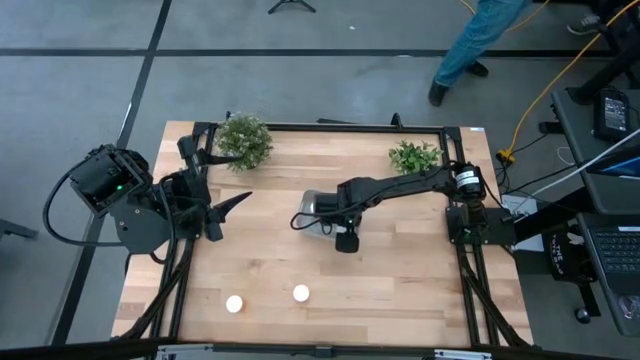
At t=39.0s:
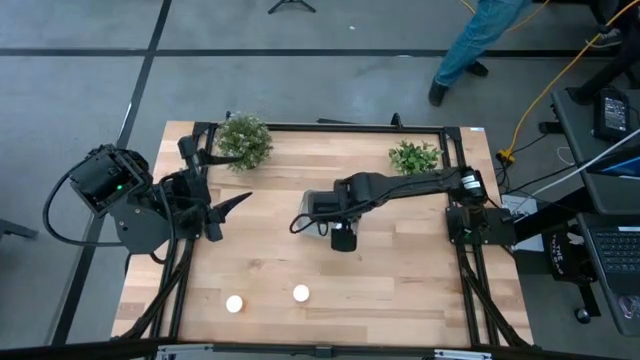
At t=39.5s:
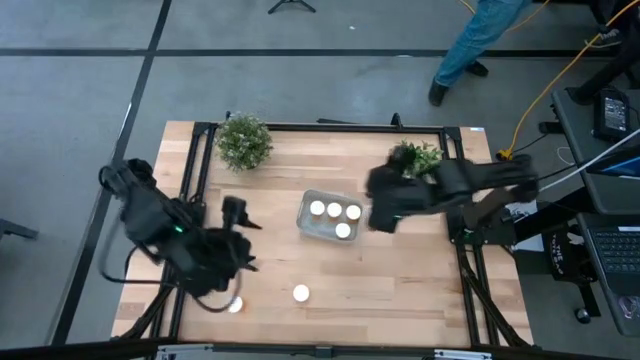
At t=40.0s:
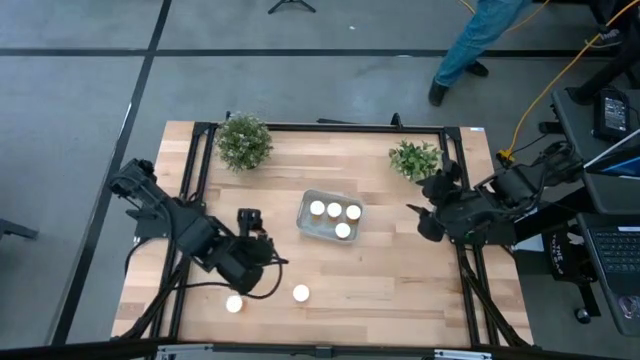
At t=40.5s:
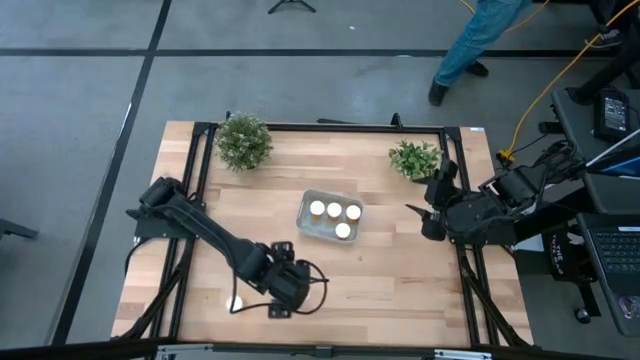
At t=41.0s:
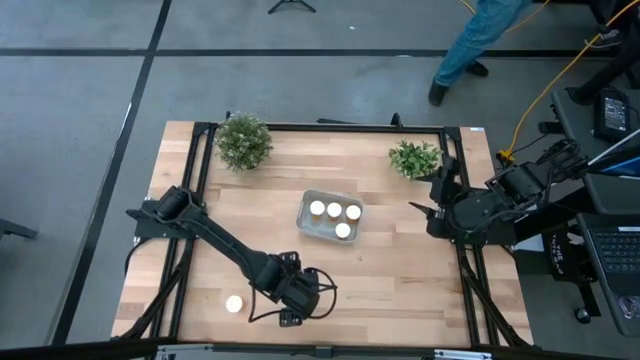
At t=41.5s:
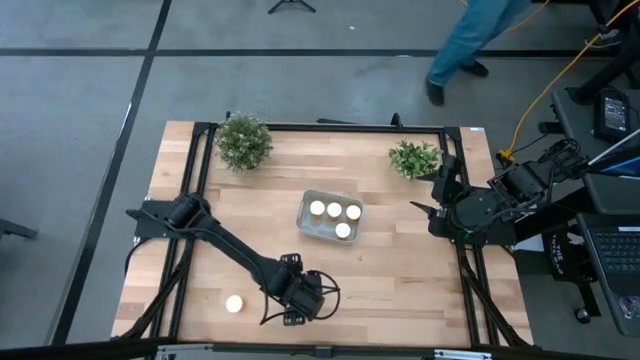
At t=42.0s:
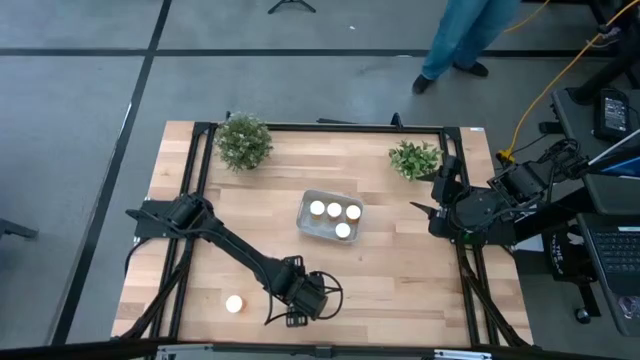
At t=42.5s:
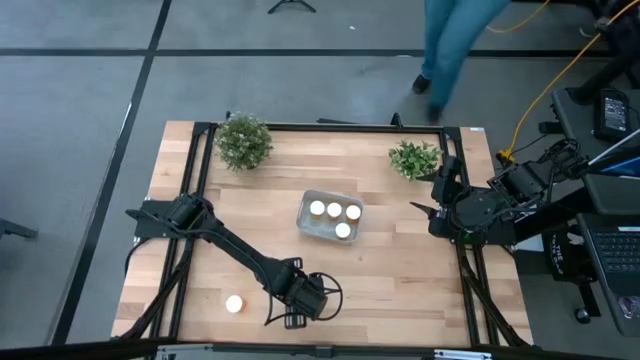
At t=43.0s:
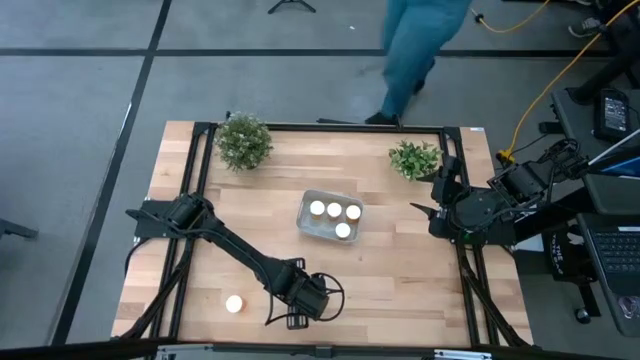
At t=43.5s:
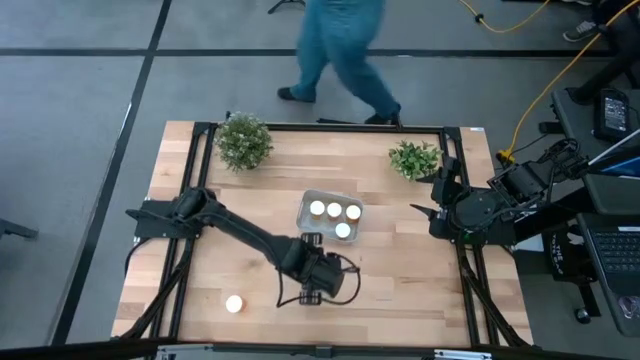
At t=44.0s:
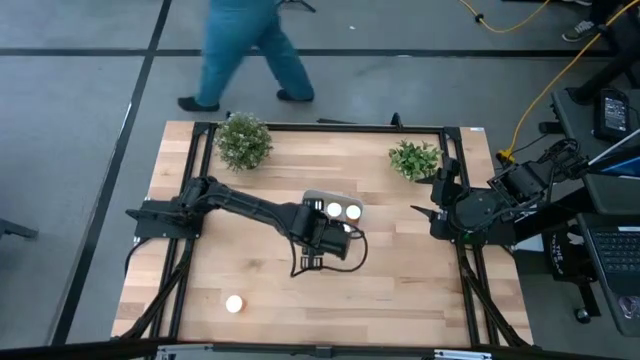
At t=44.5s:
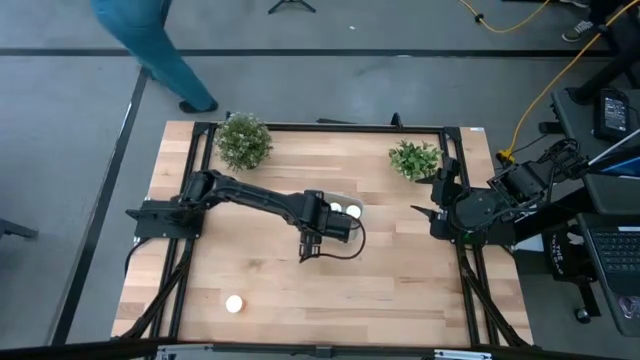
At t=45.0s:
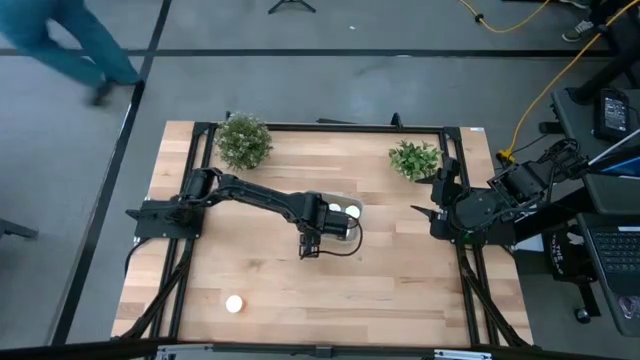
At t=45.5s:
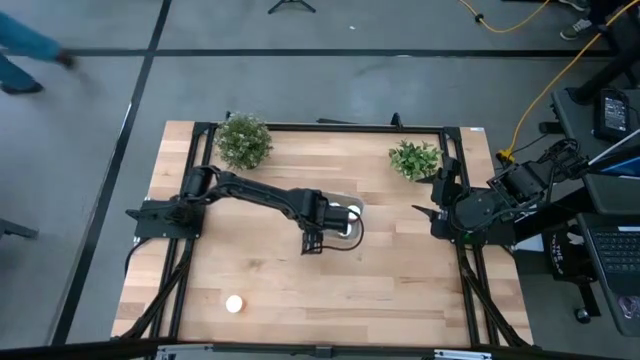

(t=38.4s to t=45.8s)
Task: Pick and place pill bottles into a basket
Put the orange pill bottle into the grey bin

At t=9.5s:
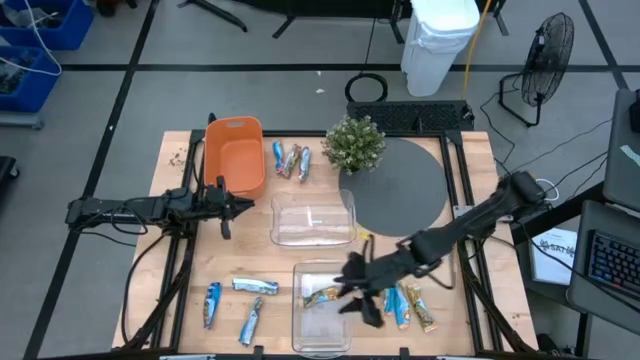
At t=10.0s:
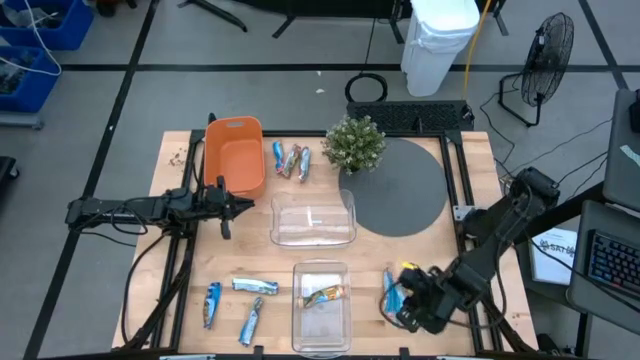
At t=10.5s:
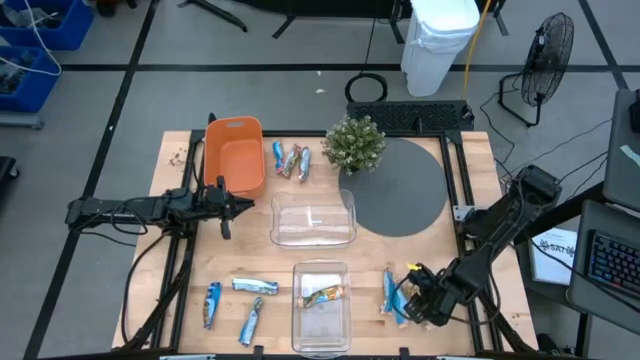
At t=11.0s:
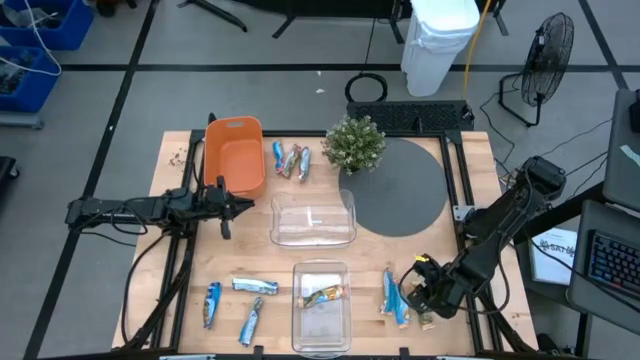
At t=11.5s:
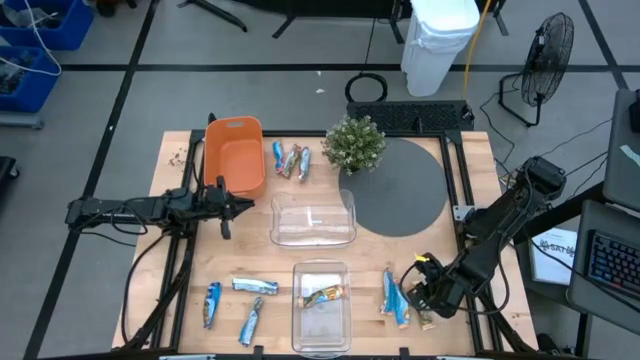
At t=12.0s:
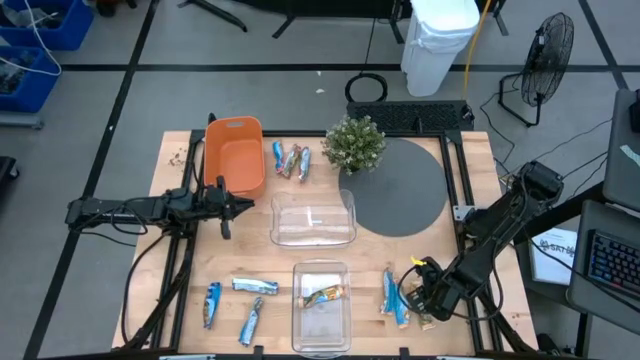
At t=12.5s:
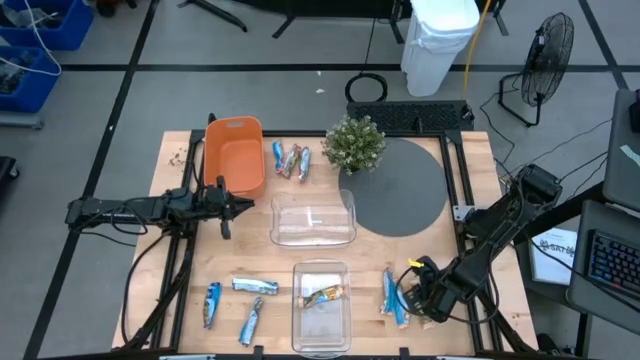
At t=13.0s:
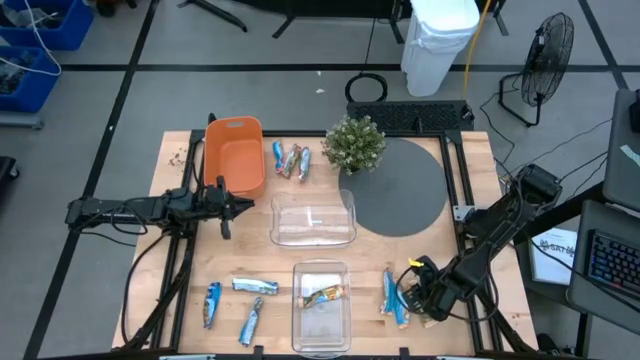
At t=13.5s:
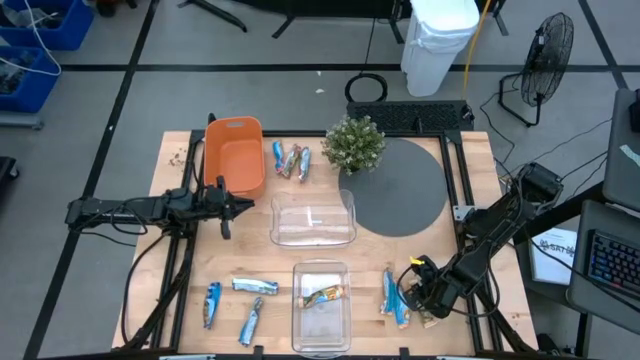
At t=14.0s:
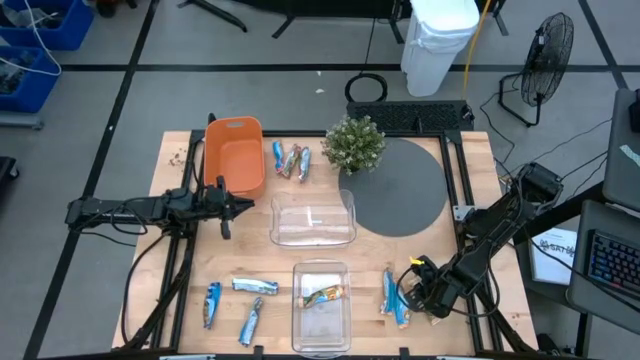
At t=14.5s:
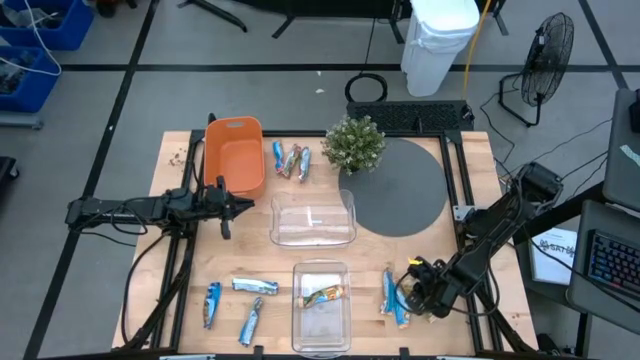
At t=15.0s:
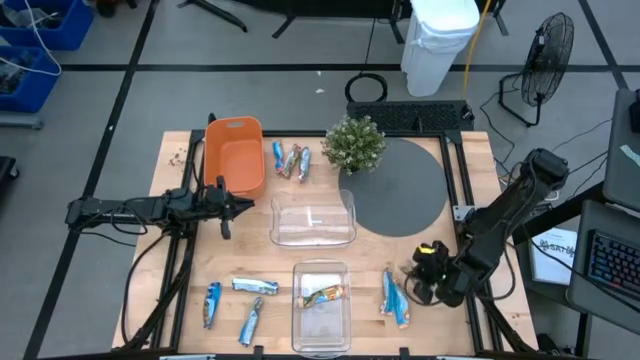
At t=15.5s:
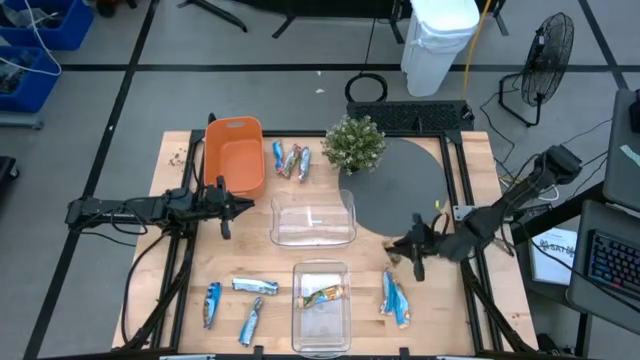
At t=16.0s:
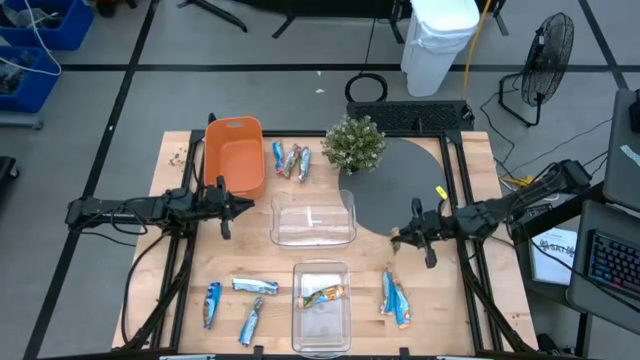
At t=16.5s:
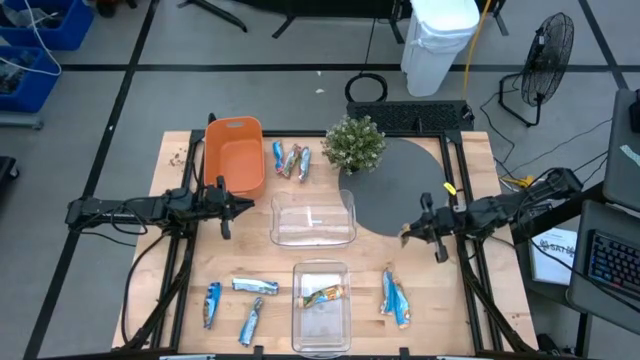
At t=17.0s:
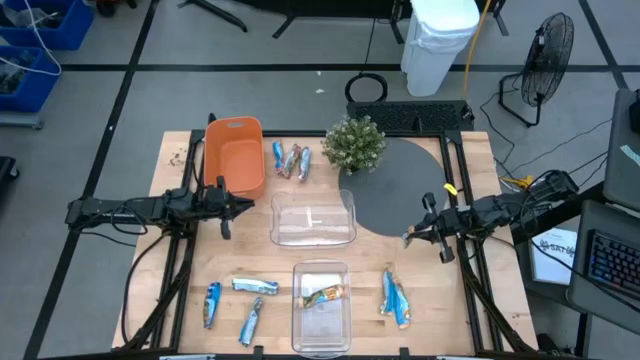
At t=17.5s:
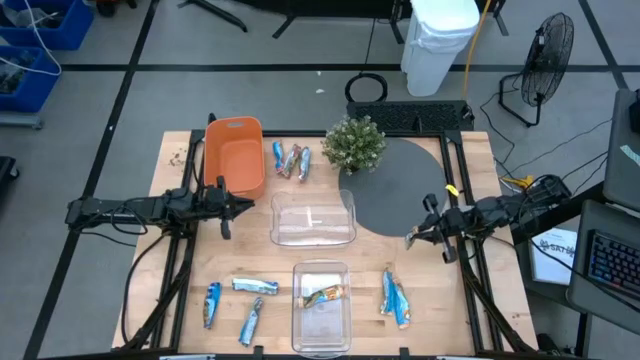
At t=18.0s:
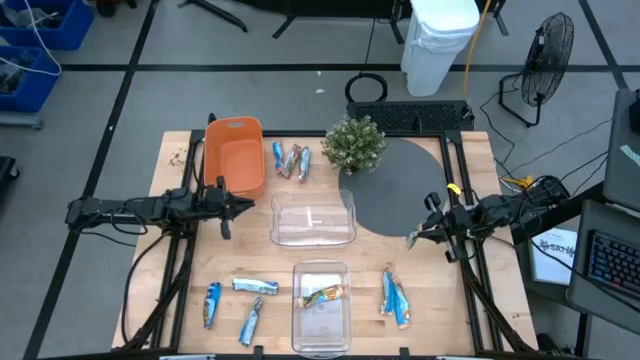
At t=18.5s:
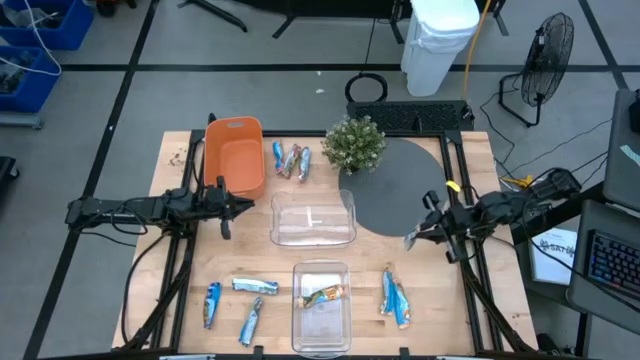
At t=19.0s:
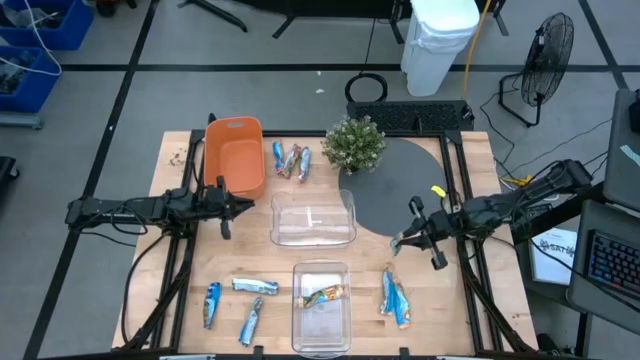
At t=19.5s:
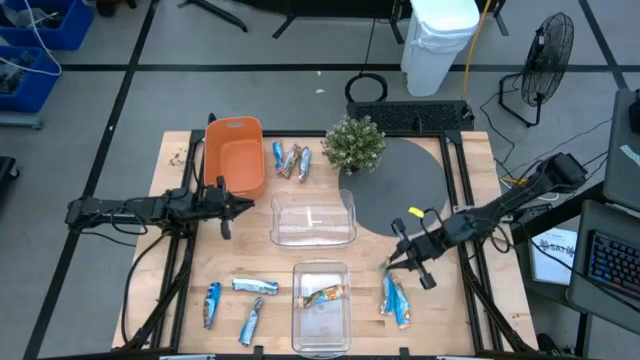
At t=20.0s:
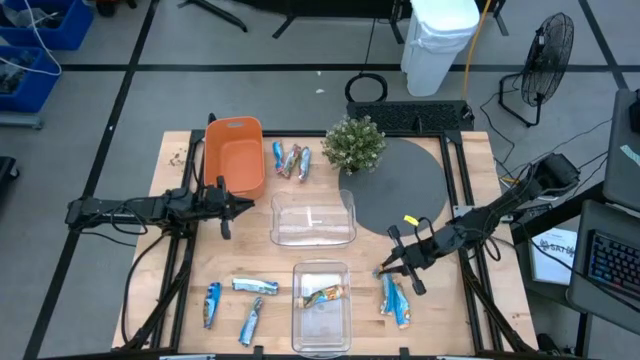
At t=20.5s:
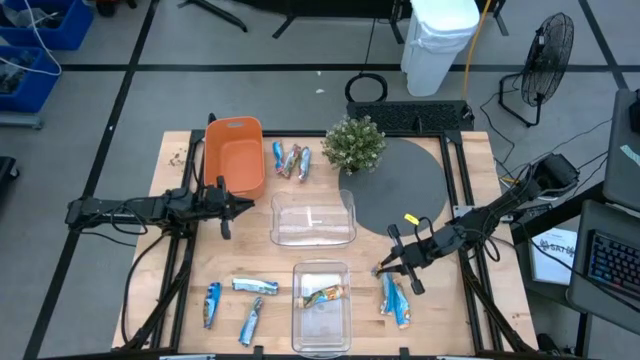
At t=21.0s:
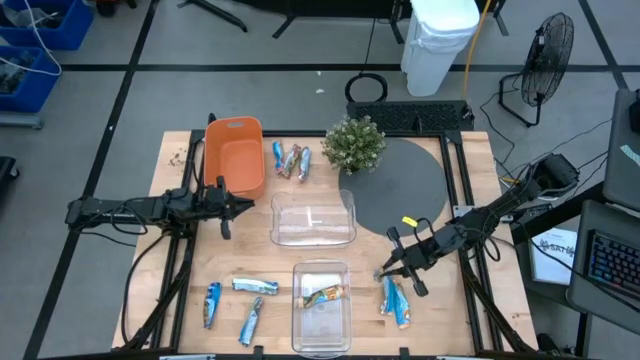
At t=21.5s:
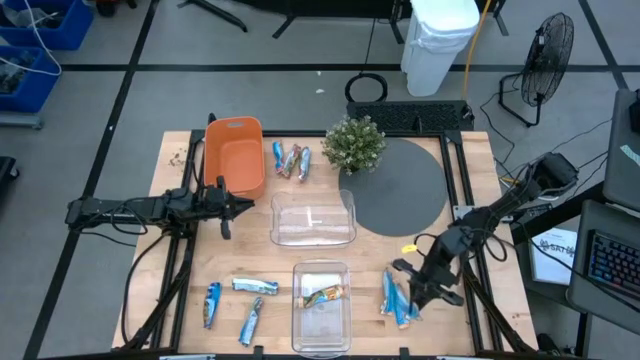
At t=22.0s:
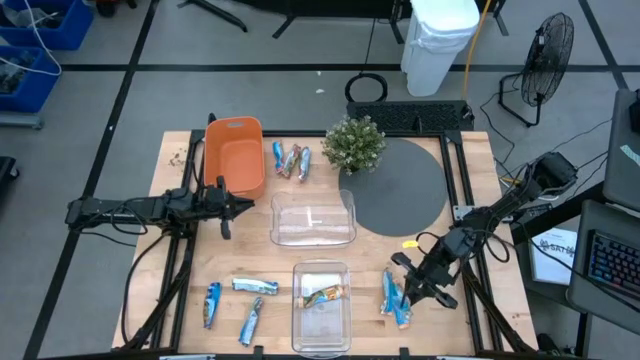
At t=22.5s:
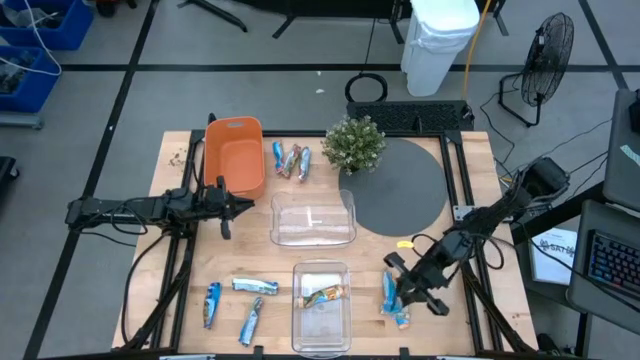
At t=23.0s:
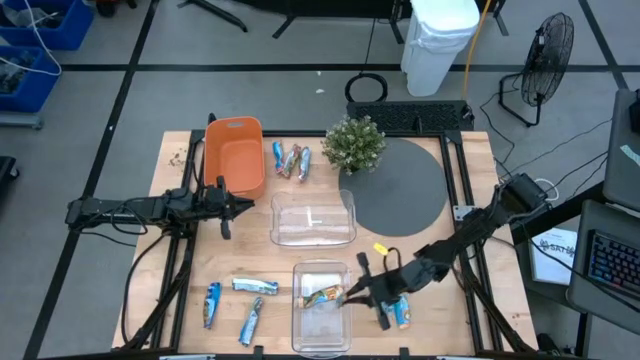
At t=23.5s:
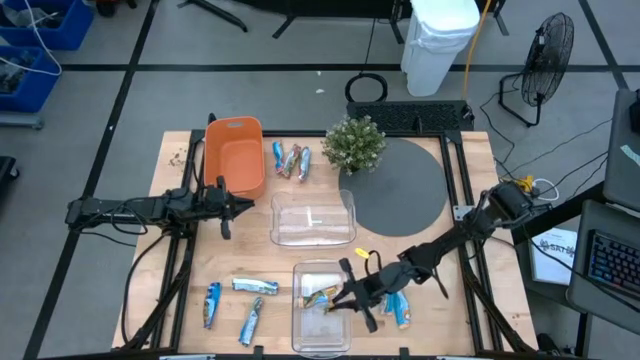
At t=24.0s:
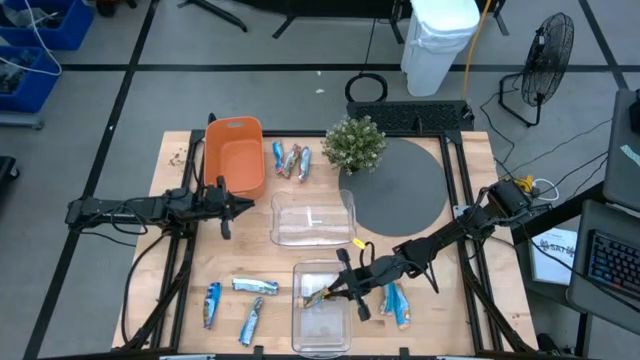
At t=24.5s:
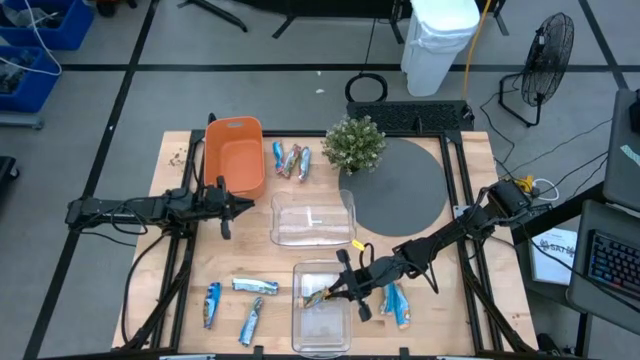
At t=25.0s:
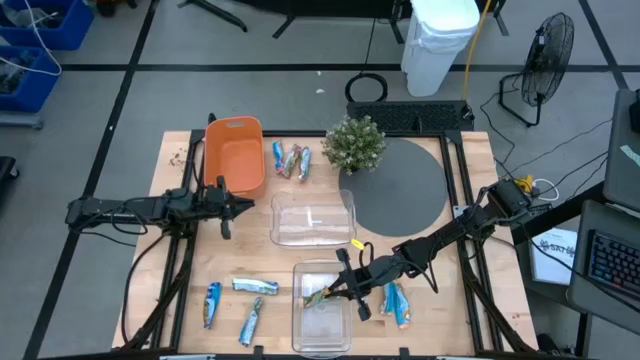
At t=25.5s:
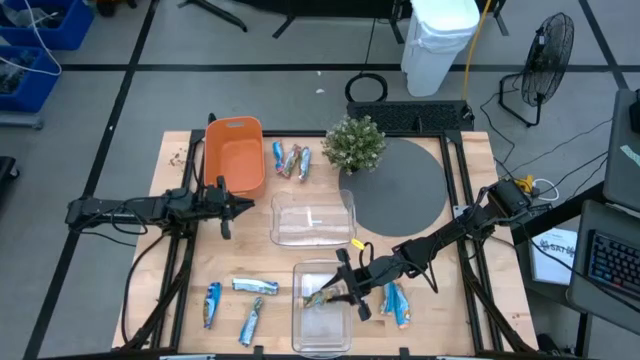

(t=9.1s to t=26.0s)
Task: Pick and place Granola Bars by type
Put the yellow granola bar into the bottom transparent bin
